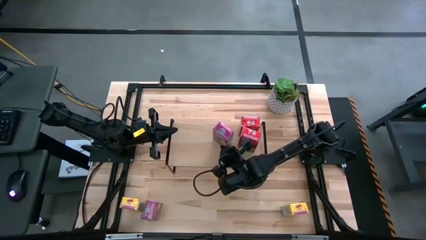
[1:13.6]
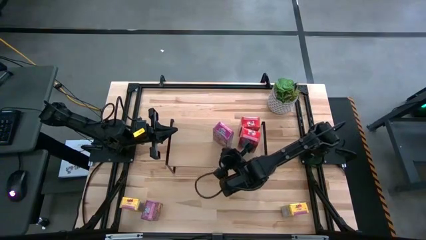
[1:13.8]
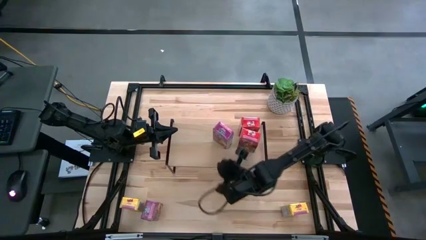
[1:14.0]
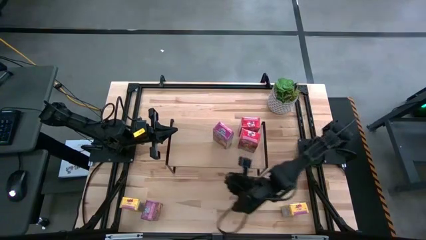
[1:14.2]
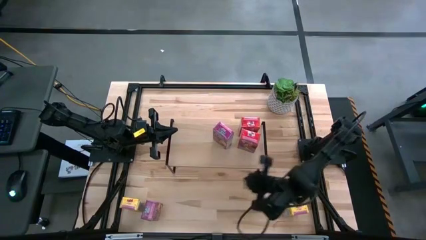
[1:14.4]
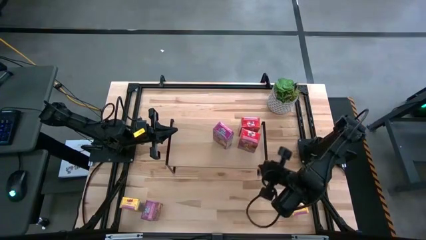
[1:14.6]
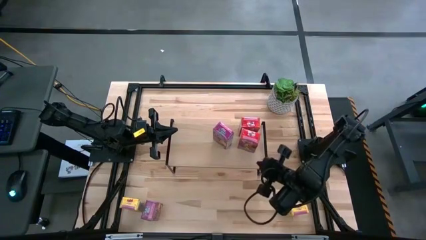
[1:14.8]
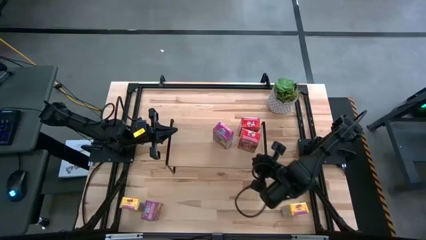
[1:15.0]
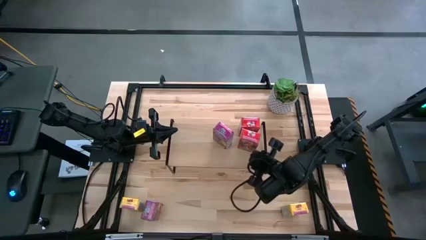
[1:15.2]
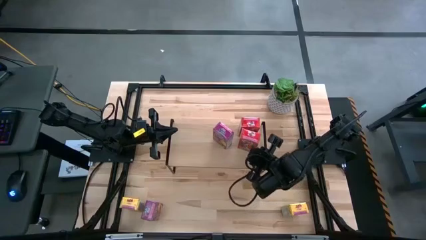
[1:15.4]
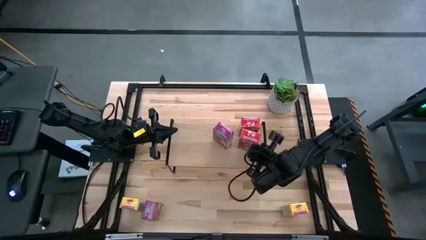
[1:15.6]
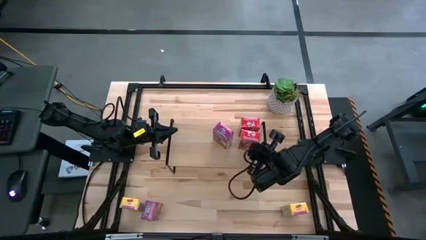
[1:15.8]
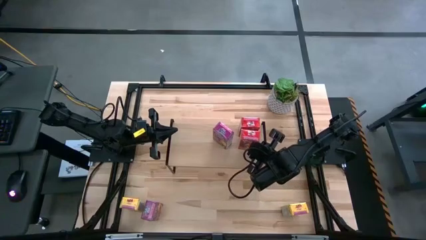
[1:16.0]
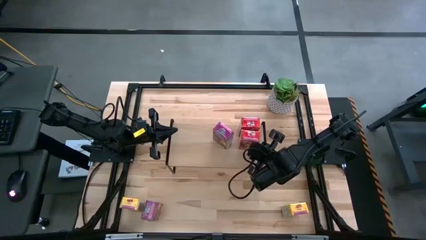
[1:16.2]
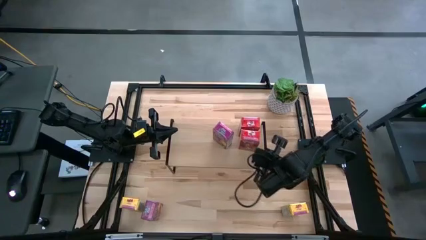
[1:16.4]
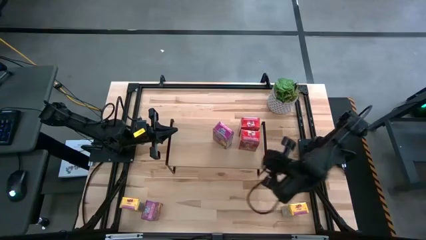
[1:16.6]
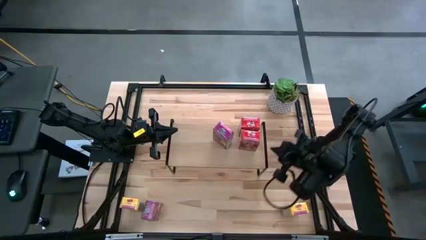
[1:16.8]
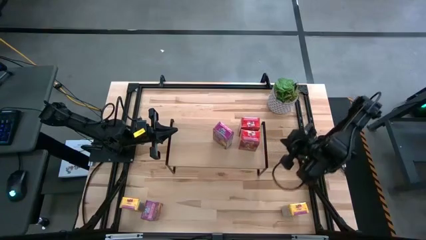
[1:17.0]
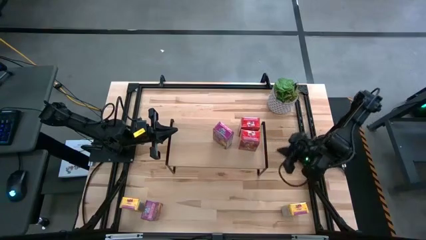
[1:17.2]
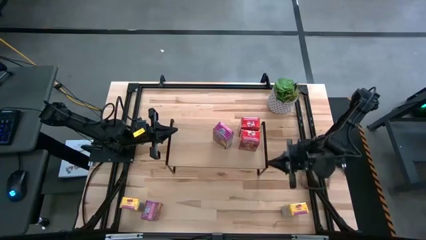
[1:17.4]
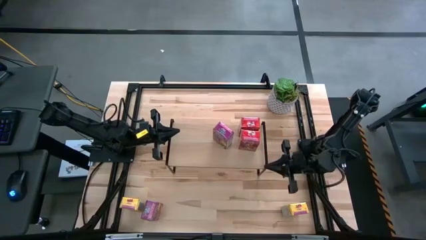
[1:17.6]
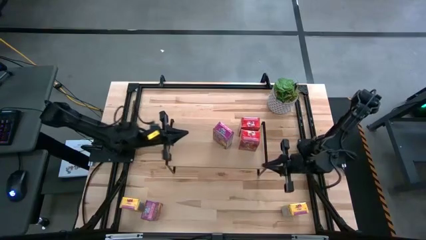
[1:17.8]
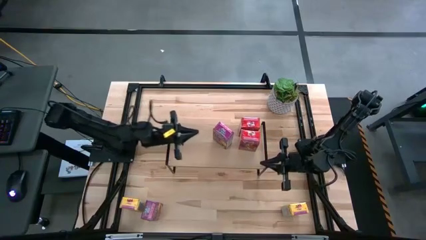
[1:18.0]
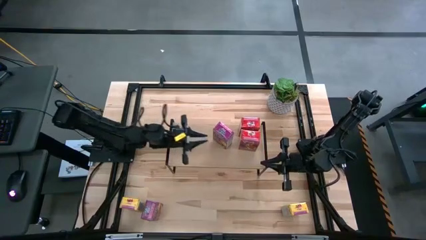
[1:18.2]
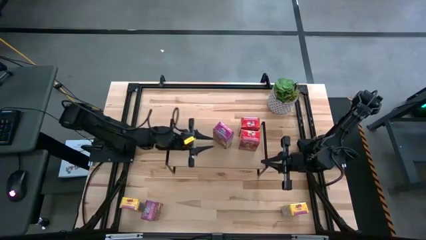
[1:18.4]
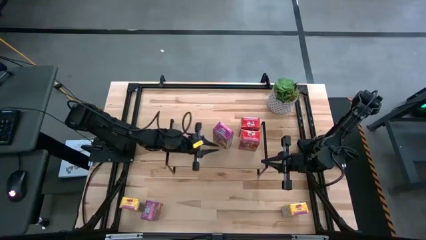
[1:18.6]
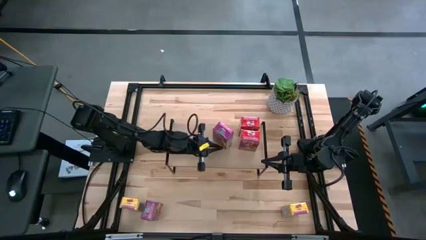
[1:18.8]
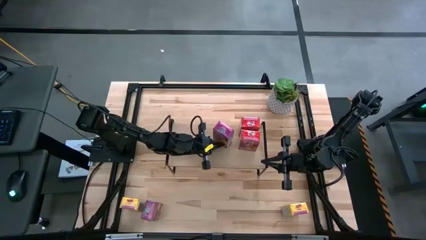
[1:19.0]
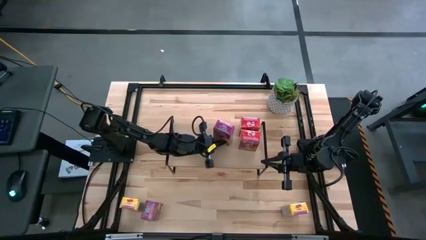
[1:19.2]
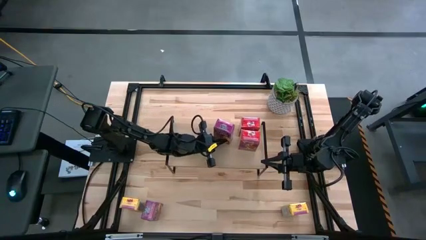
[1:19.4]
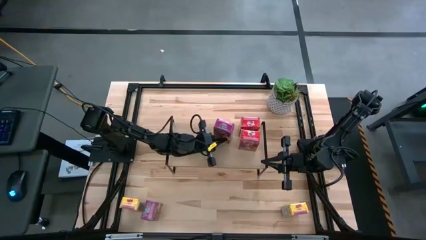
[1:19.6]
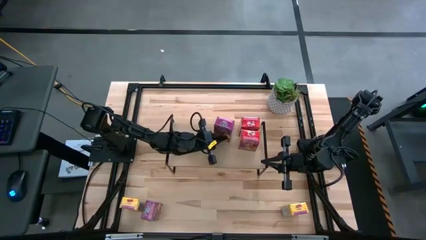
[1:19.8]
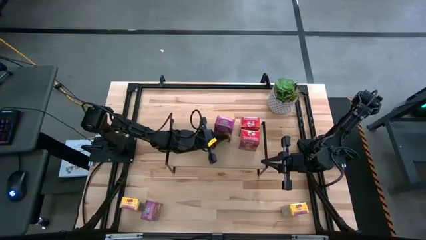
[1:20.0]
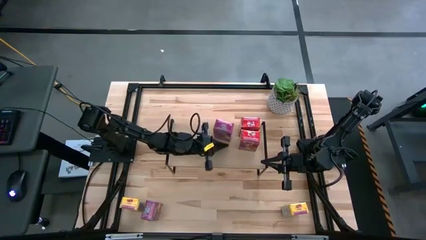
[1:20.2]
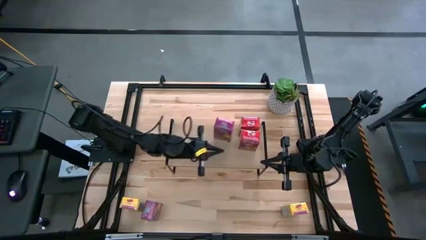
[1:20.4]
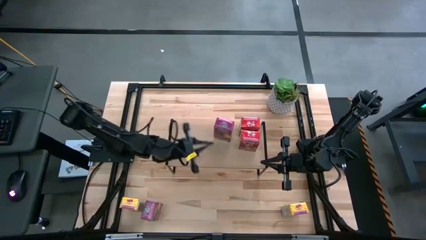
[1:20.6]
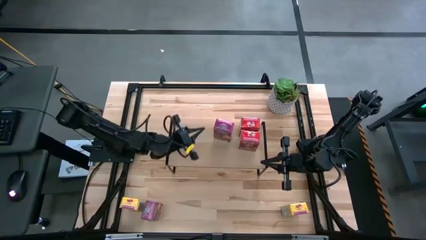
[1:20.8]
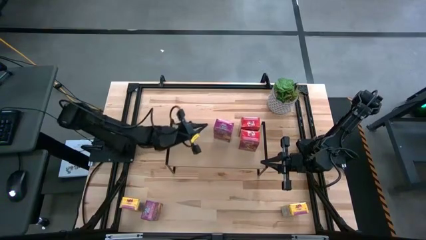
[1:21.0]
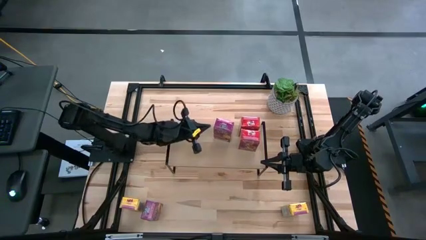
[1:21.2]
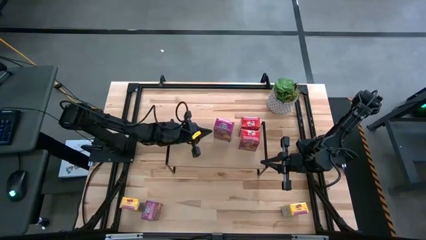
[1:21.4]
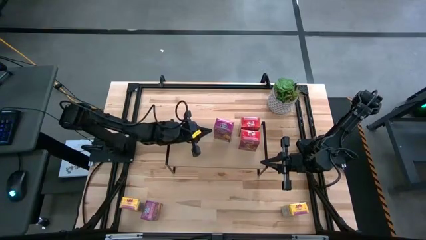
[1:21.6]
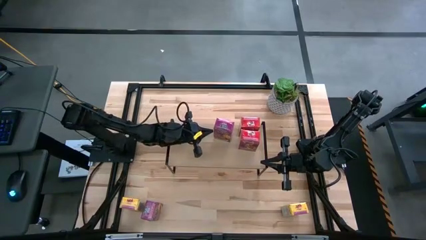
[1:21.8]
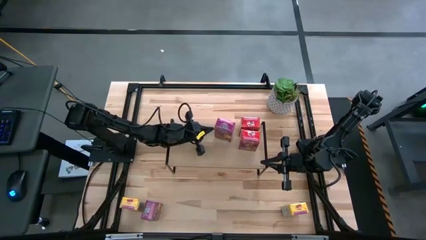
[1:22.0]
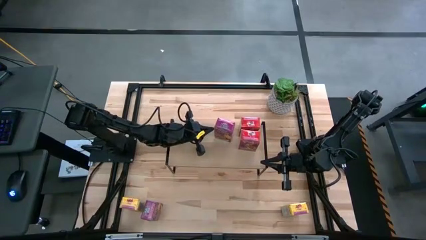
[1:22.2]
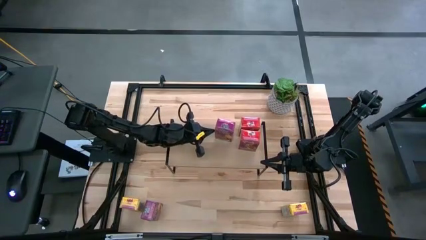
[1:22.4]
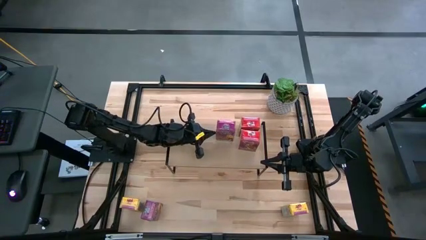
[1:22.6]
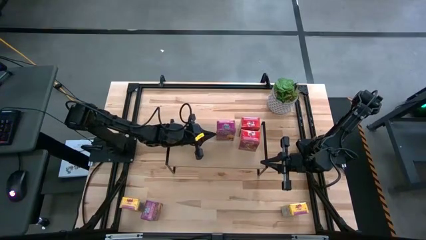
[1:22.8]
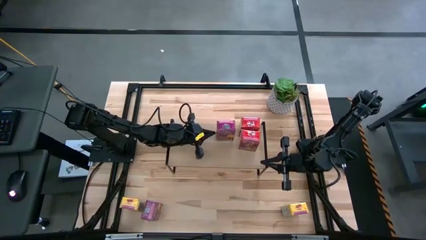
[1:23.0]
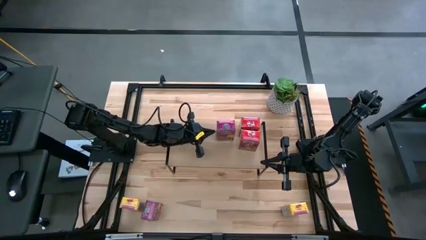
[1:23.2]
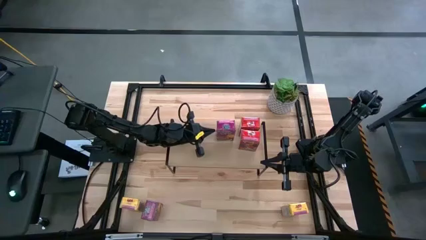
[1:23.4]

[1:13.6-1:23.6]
Task: Stack cereal on shelf
Adjust the cereal boxes on the shelf

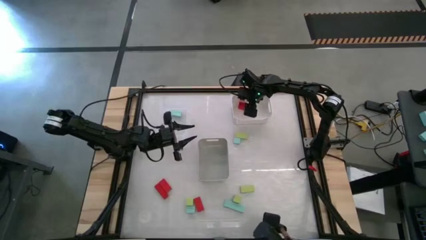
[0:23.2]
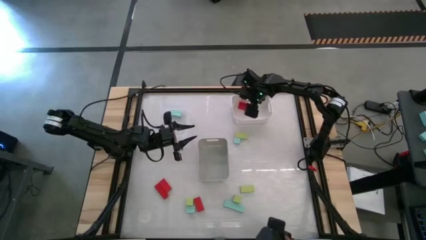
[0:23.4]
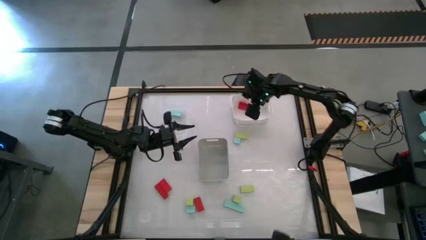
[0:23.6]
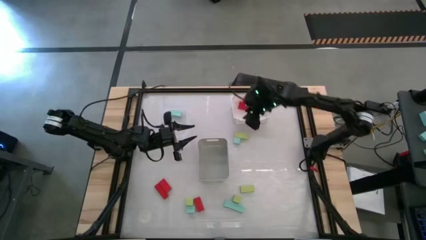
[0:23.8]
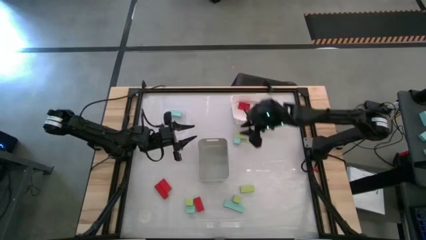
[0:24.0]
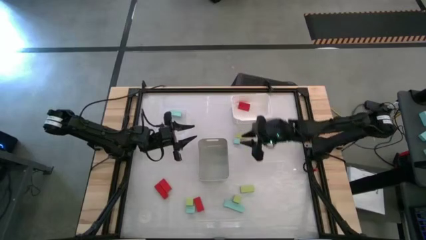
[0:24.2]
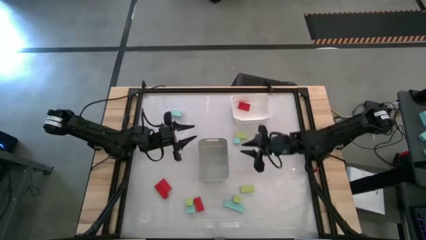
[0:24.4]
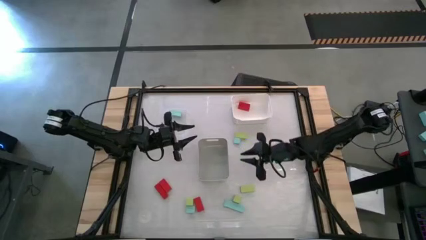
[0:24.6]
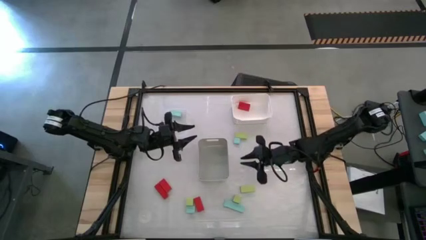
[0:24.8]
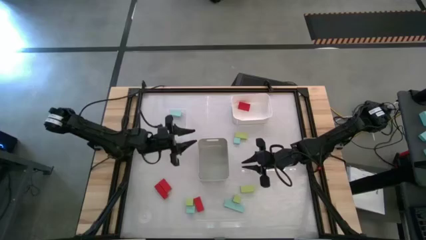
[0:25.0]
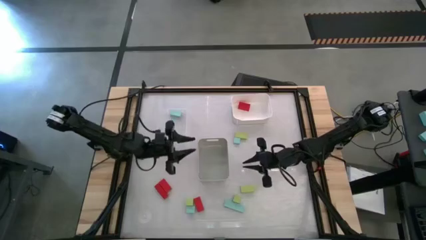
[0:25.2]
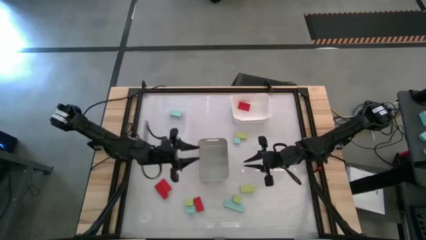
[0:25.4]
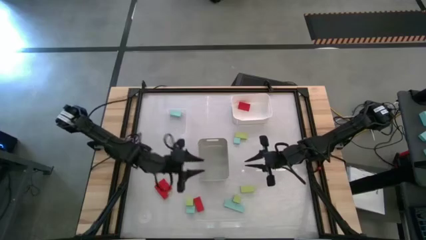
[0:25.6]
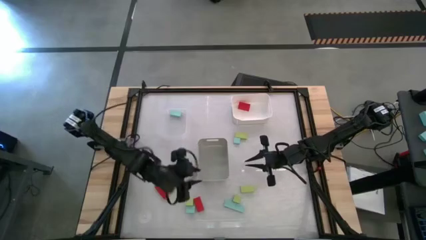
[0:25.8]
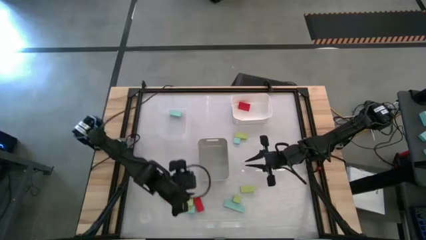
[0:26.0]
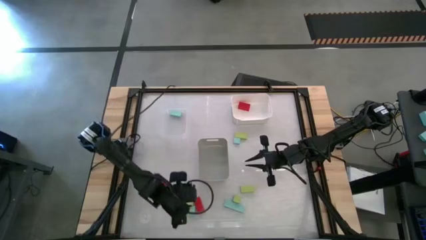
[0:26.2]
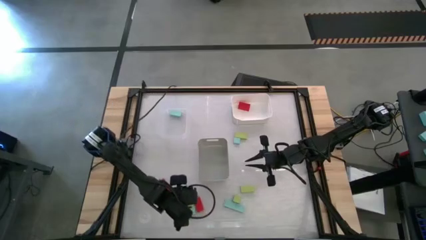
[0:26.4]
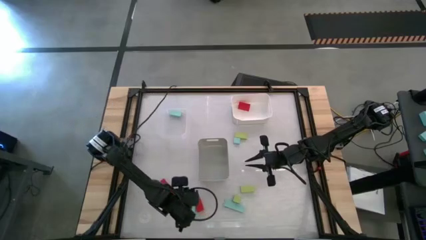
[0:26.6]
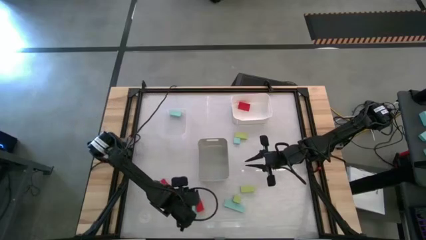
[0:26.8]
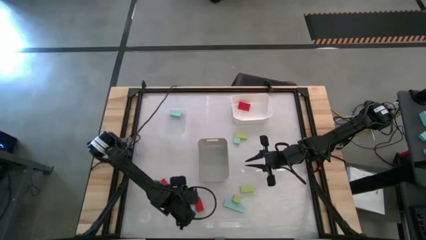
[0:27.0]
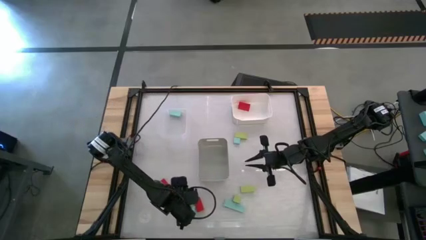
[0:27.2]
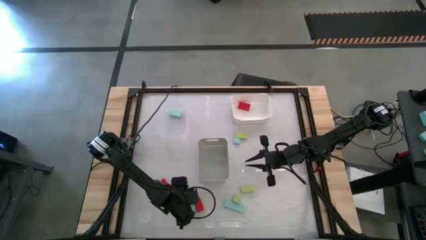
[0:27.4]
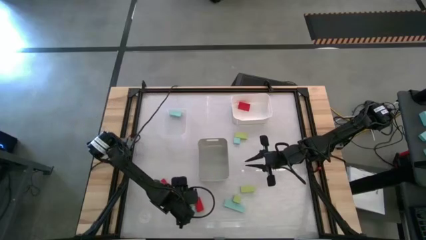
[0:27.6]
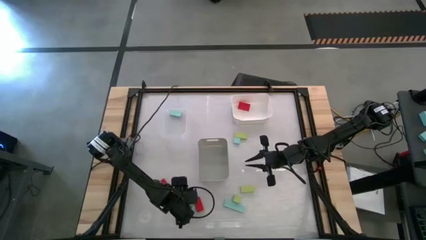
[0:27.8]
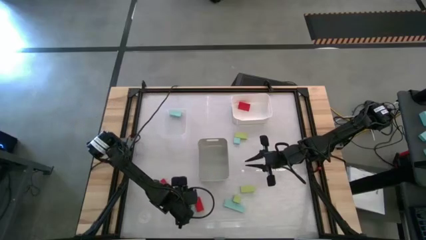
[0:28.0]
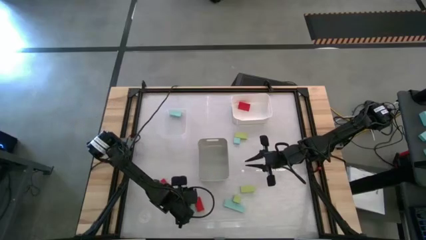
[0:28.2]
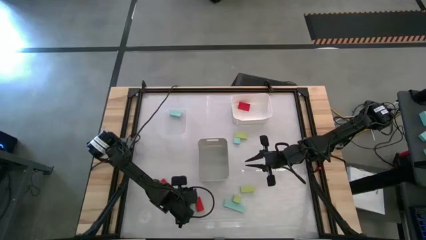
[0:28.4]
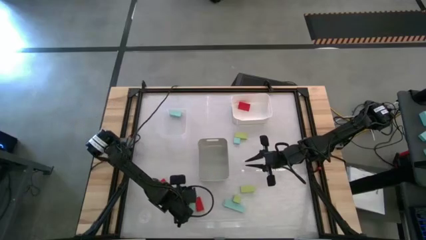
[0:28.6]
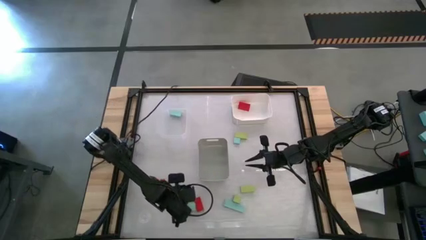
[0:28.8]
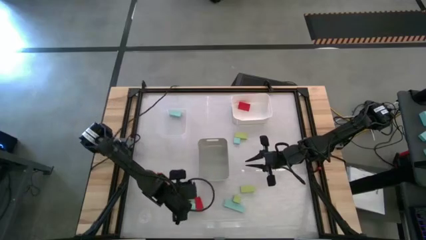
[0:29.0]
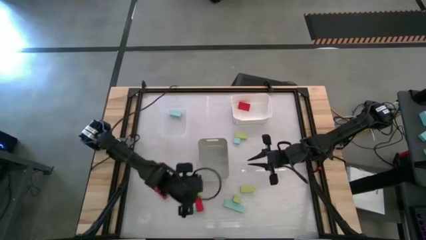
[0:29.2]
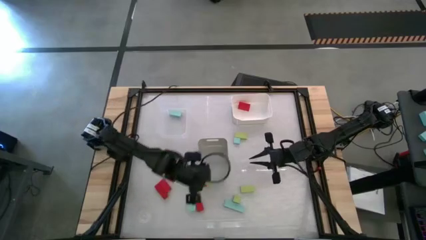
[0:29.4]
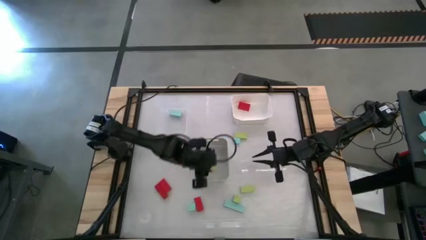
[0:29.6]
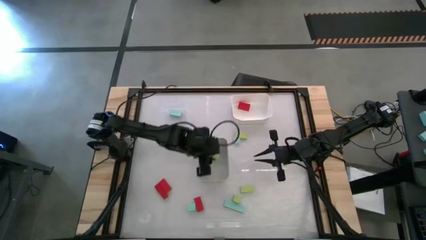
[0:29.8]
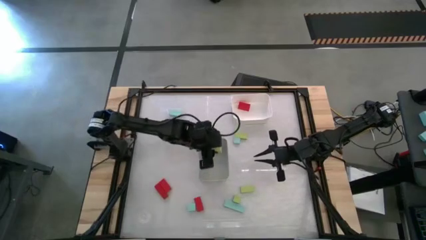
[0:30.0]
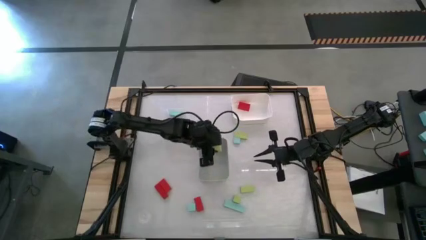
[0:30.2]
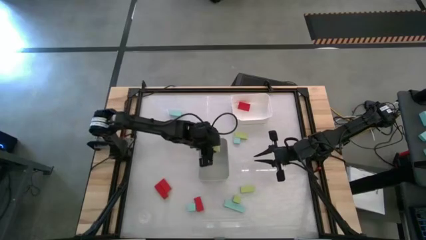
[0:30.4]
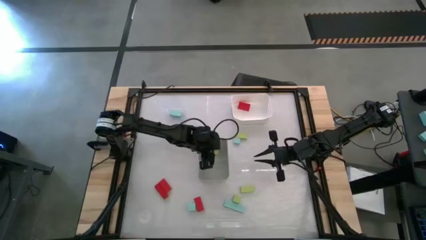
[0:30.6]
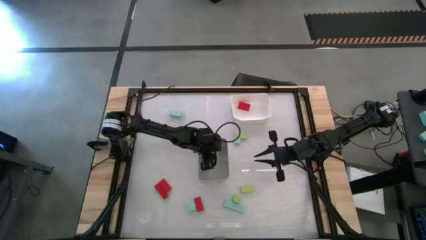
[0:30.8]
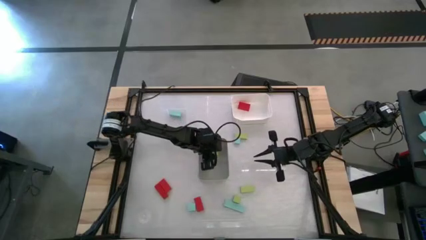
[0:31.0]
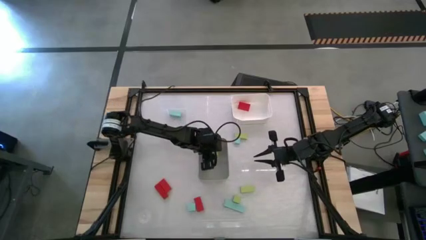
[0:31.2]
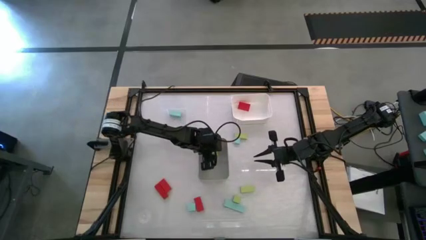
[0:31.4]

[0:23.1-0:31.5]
Task: Sort & place blocks by color
Put the green block into the gray bin
